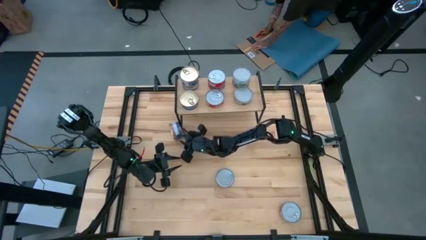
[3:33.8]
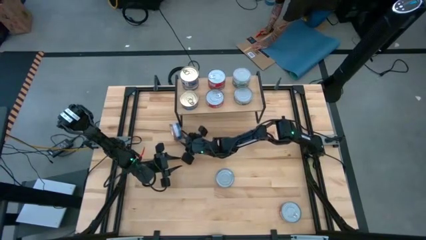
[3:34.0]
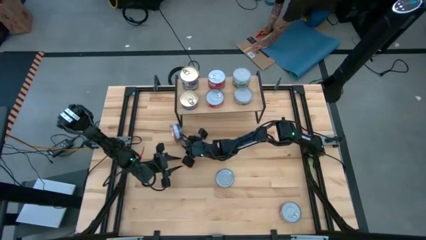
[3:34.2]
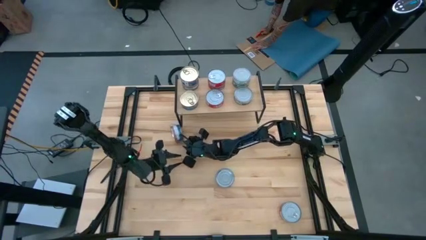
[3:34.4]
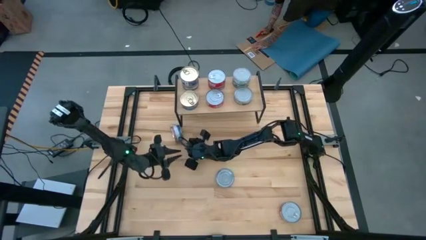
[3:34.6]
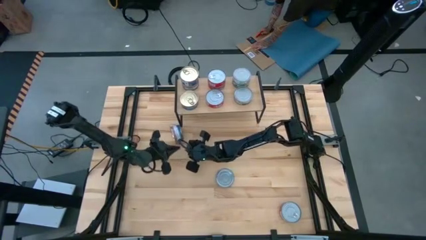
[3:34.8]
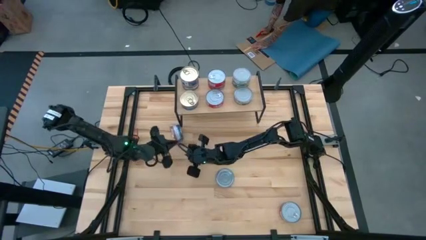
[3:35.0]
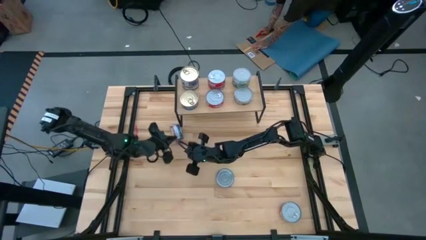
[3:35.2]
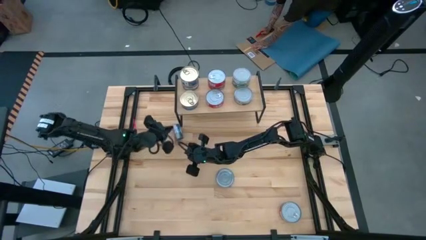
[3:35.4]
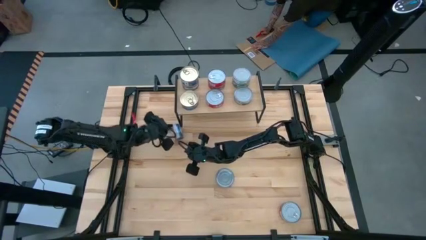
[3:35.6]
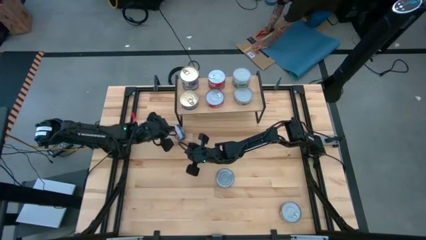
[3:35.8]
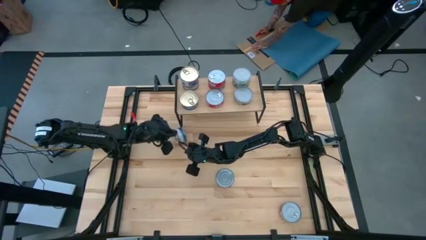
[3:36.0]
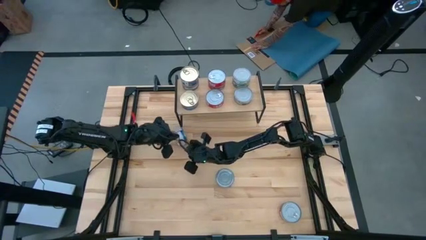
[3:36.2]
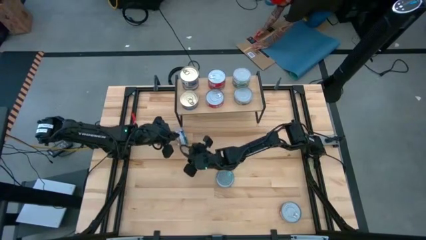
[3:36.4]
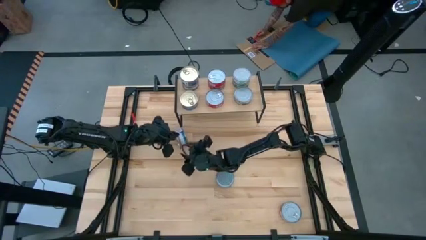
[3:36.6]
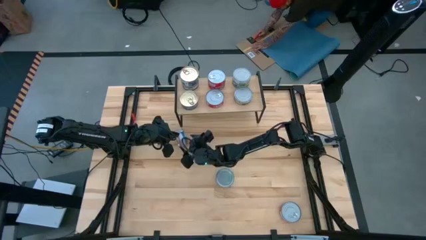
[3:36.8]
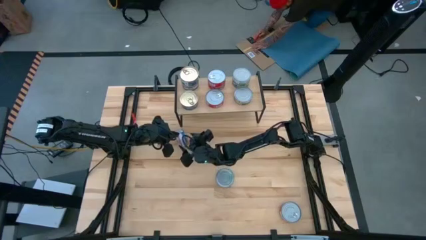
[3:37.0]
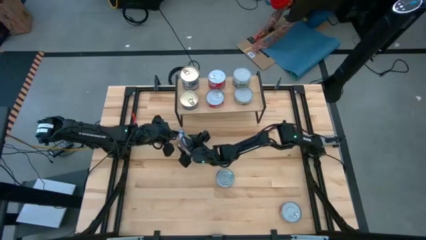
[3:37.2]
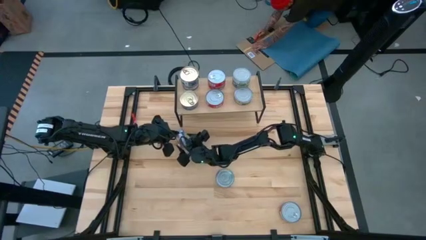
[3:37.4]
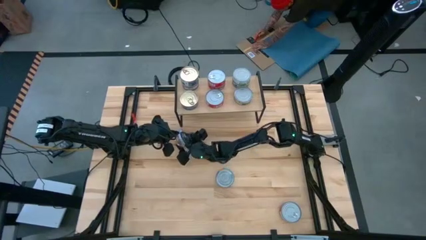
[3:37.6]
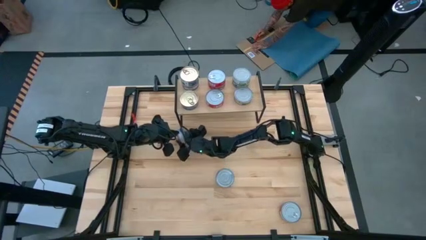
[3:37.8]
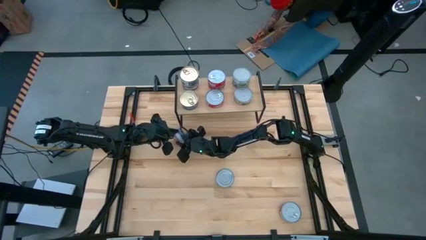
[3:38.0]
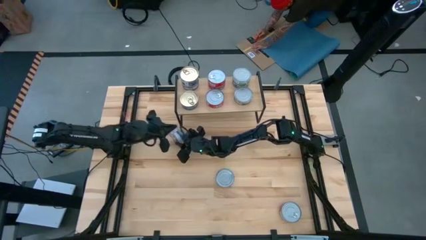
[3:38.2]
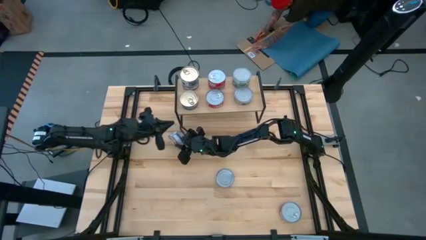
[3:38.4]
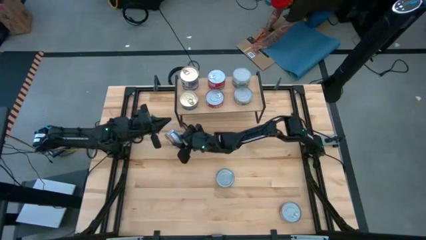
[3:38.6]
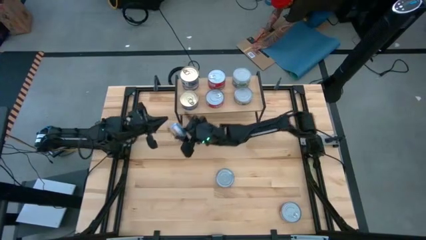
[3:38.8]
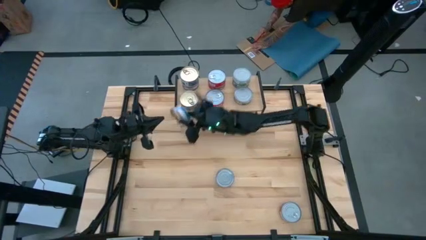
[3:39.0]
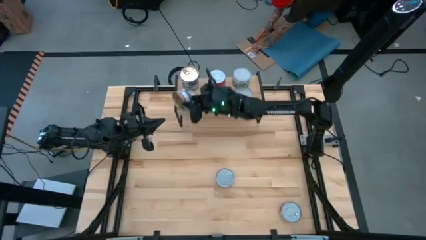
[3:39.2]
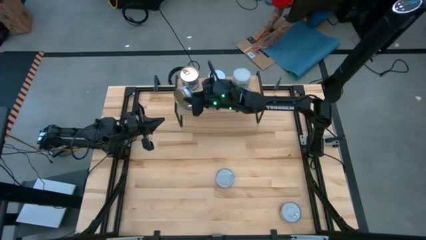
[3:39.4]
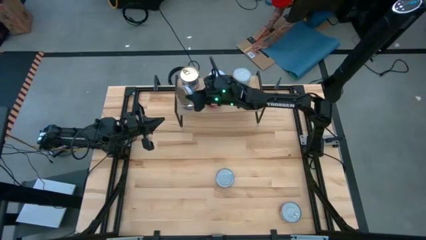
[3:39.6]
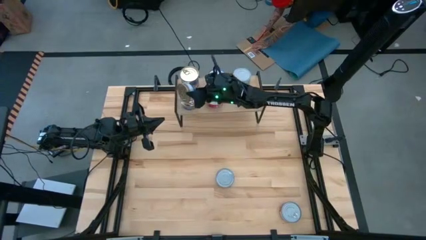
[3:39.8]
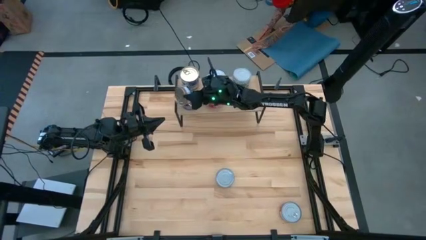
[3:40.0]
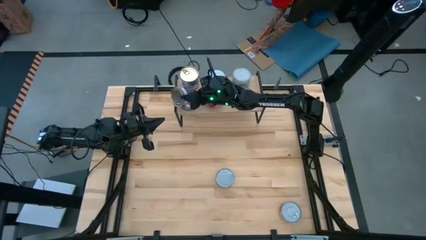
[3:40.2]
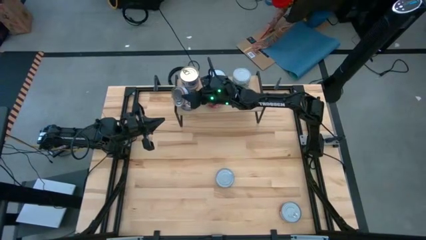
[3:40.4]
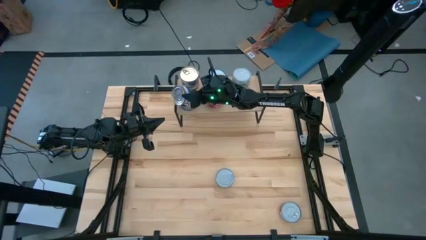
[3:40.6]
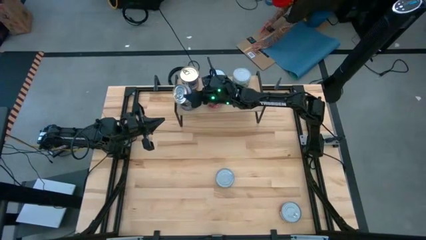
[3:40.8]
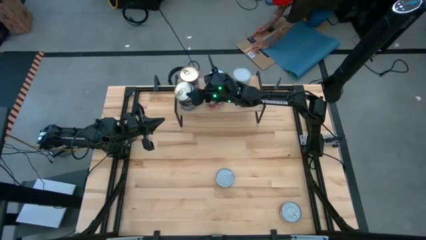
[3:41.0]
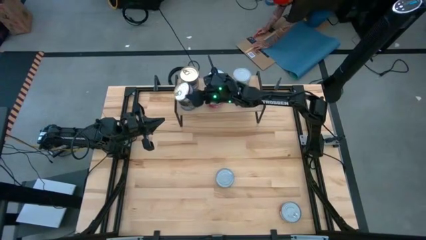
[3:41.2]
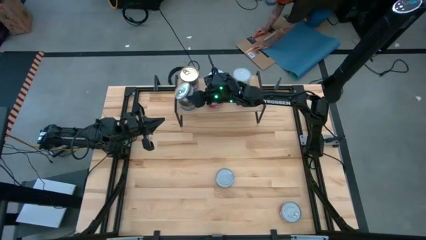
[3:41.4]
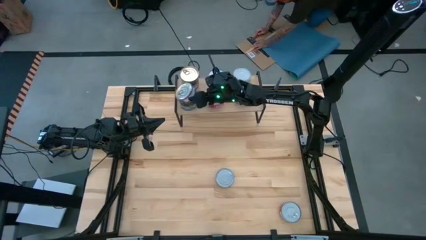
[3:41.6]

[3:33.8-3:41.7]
Task: Stack canned seafood by type on shelf
Stack the blue pink tuna can on top of the other blue pink tuna can on the shelf

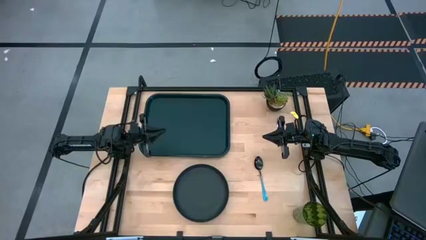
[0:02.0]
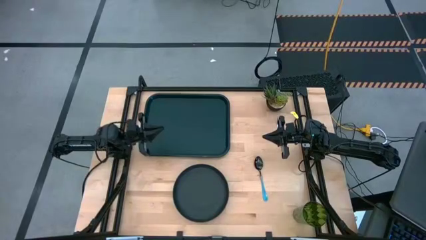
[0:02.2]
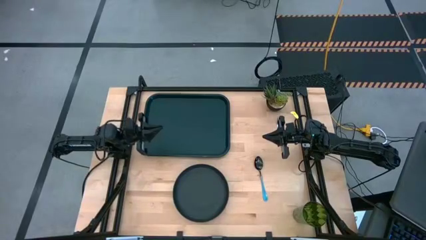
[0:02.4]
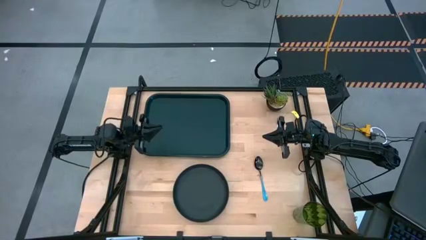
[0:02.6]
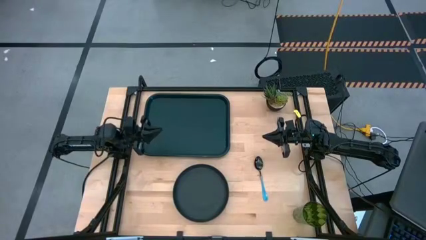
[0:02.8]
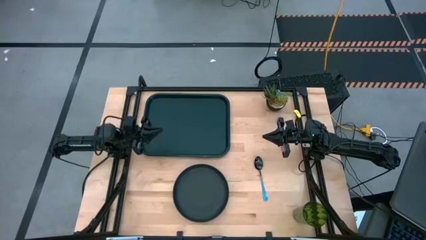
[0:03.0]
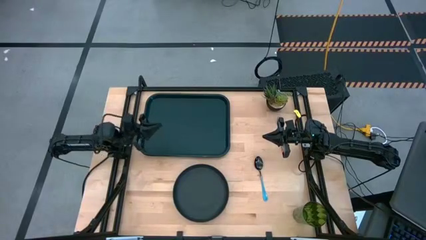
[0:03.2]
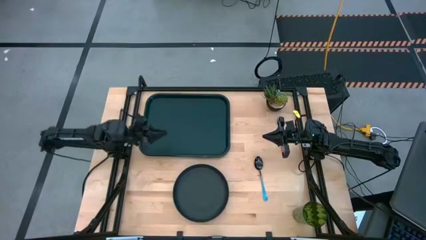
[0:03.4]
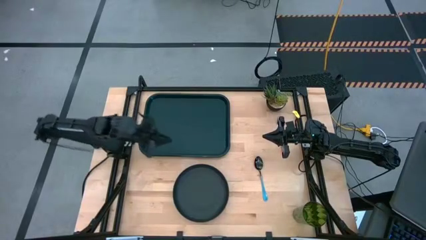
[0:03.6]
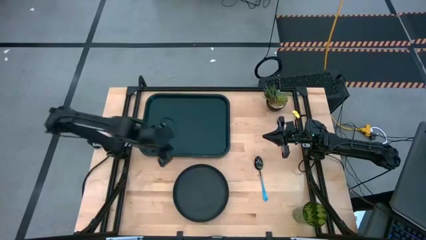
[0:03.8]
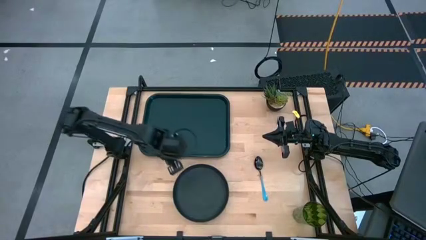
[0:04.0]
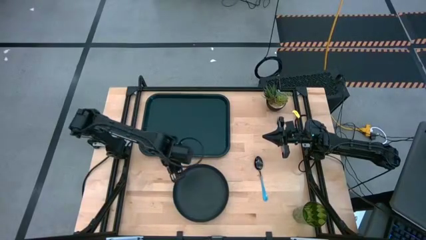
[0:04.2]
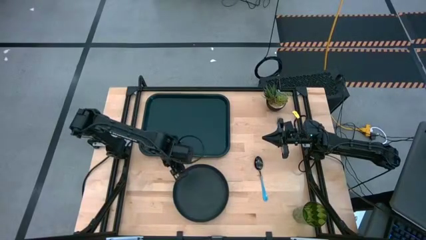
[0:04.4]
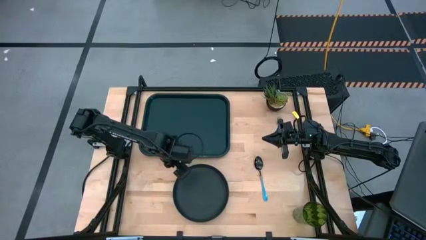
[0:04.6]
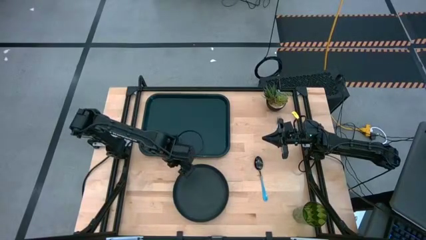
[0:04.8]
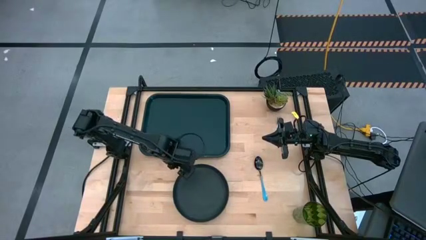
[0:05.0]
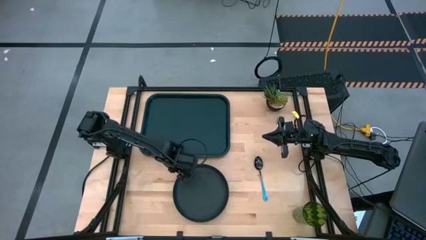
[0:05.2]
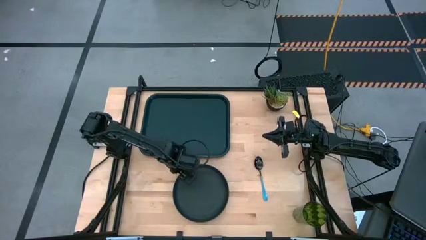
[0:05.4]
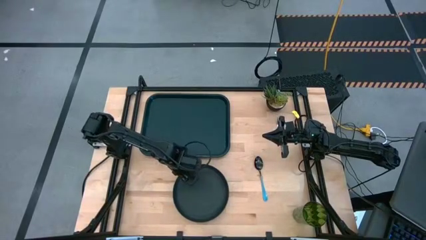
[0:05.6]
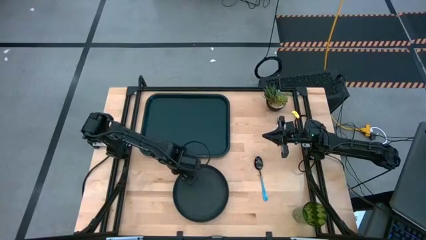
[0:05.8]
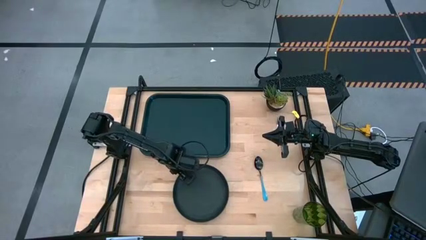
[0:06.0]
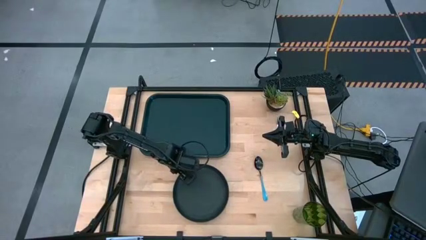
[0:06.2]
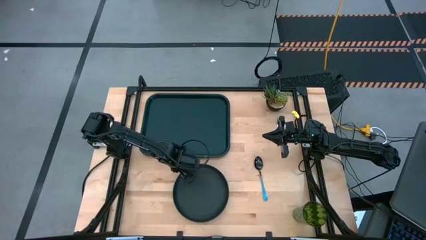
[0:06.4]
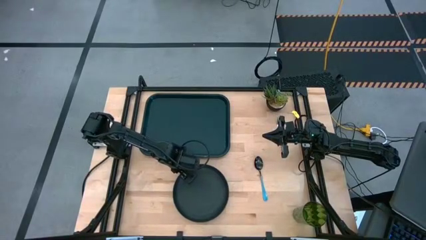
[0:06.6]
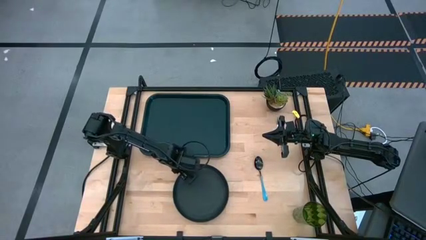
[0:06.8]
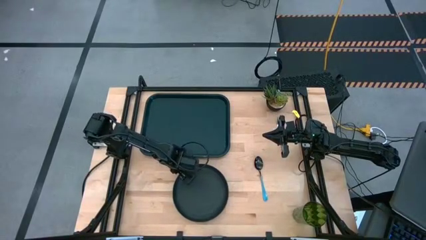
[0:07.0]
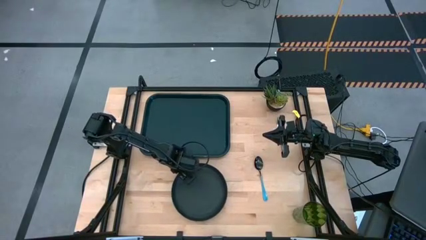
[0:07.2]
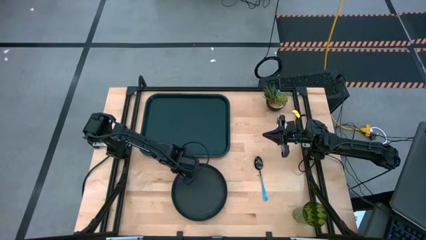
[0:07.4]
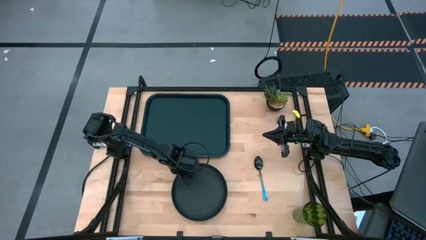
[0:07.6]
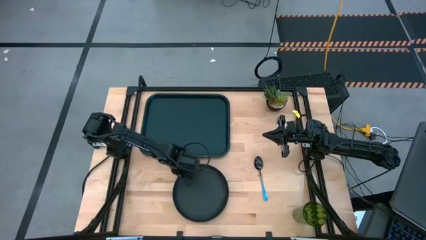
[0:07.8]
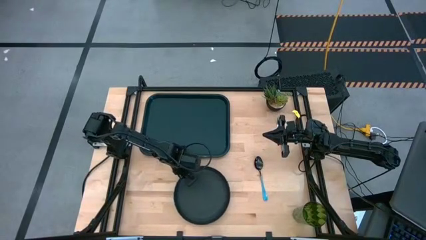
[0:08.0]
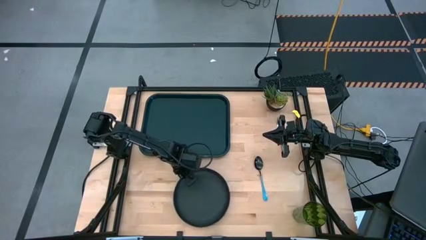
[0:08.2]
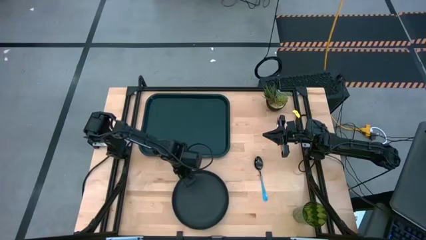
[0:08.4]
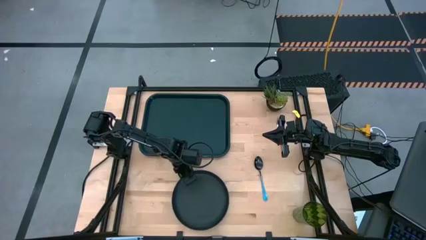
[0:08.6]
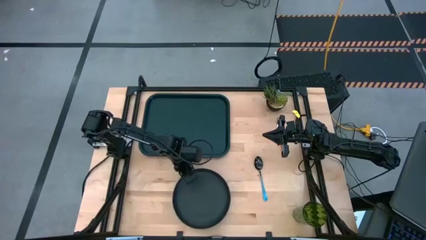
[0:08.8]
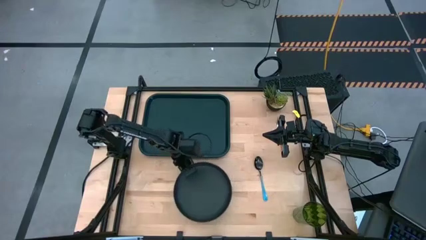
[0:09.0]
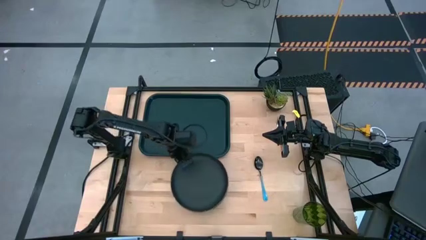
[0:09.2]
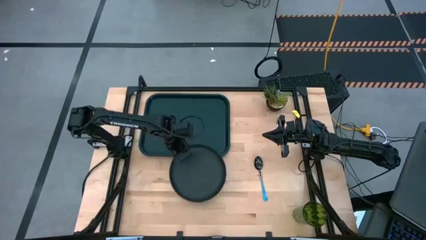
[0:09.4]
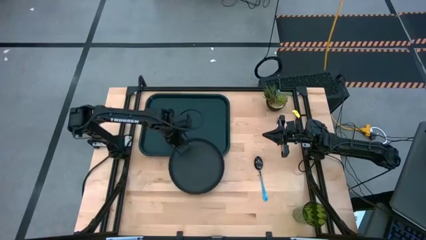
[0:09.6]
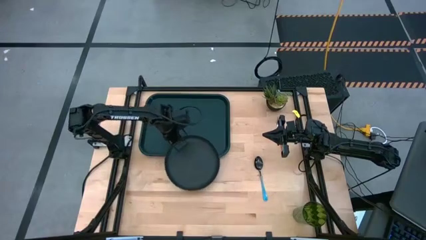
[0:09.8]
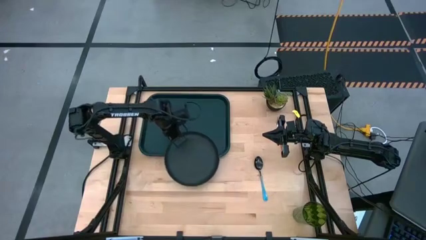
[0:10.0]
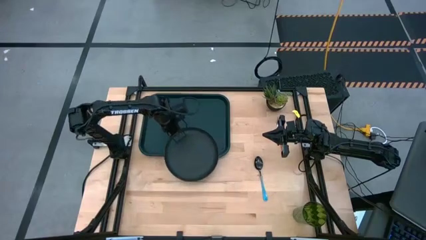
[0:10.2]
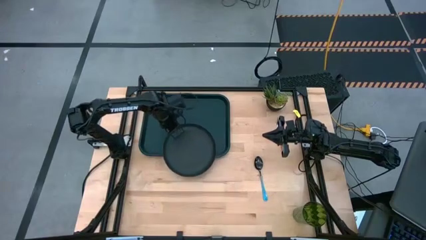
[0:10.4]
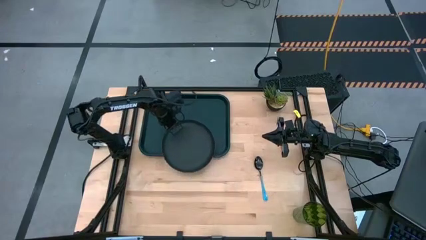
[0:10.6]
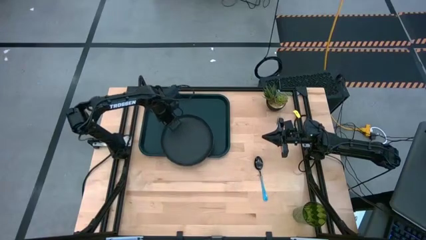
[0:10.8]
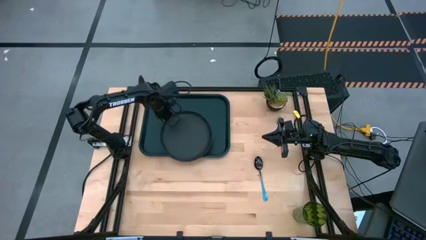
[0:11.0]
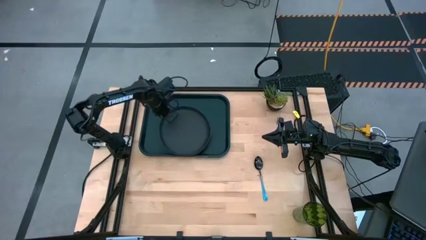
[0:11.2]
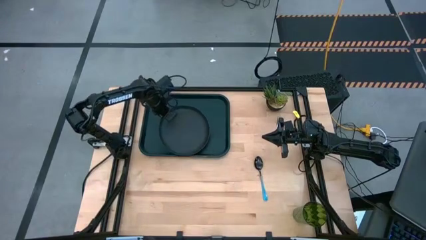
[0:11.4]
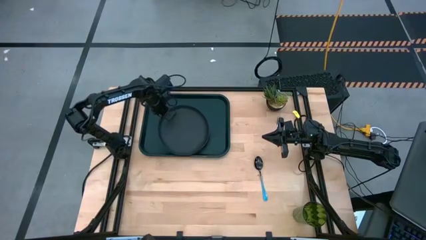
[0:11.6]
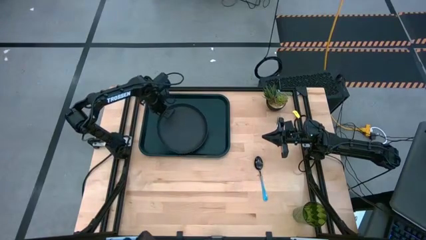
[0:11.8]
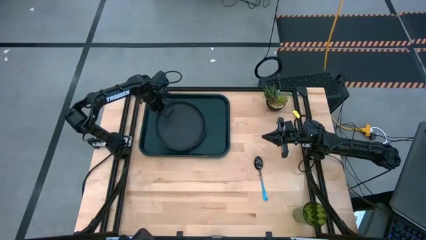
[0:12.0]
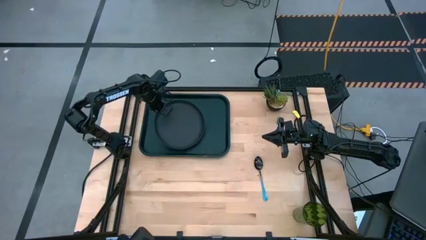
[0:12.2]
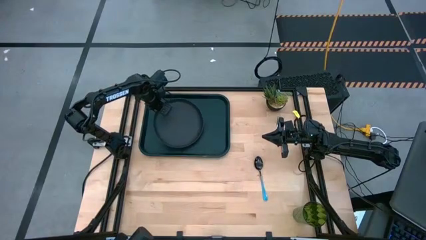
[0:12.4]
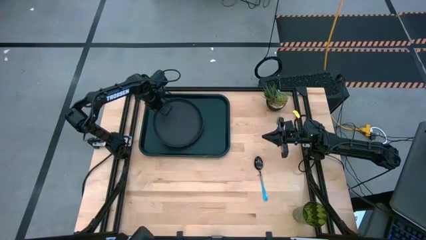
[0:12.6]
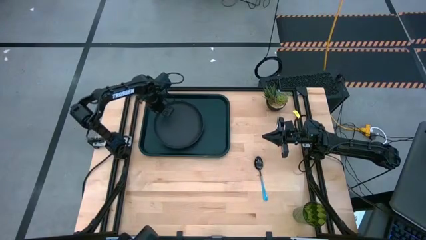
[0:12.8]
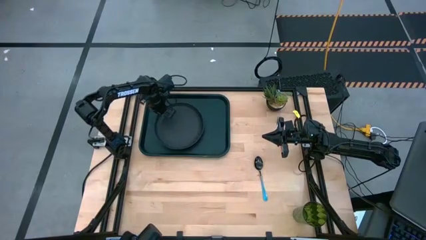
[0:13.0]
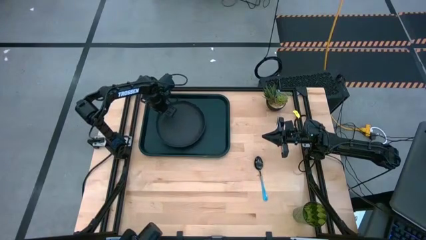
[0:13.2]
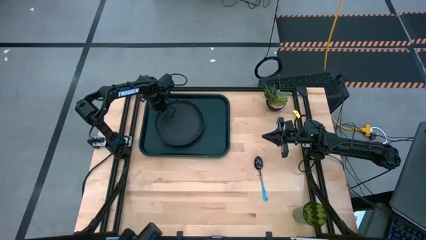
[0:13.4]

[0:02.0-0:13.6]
Task: Pick and place plate/cup/fork/spoon on tray
Put the black plate on the black tray
